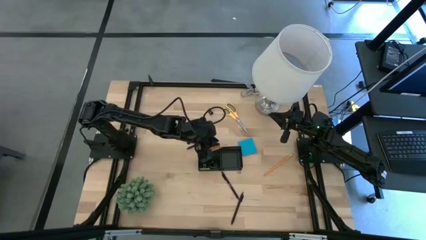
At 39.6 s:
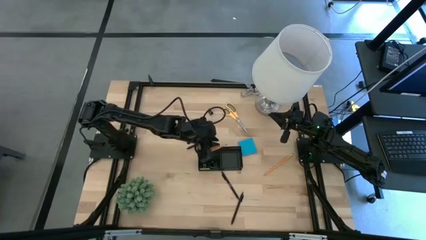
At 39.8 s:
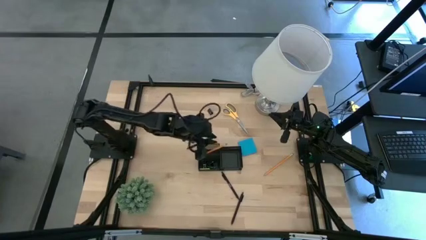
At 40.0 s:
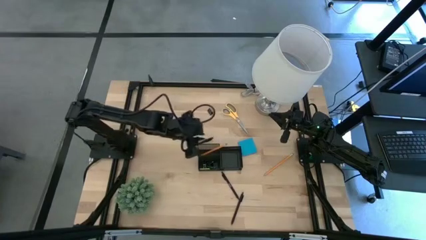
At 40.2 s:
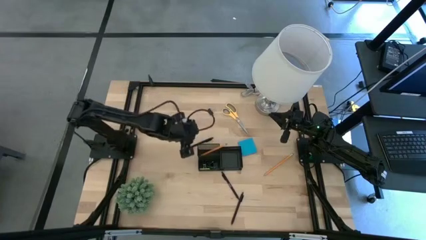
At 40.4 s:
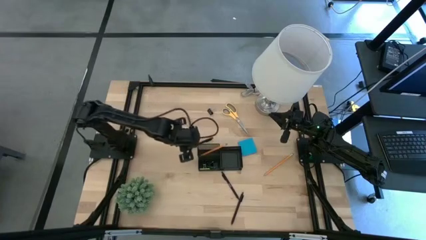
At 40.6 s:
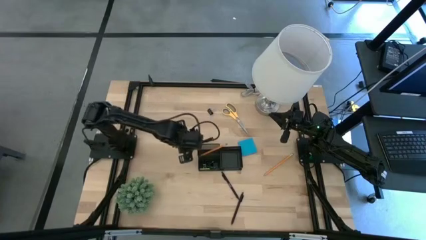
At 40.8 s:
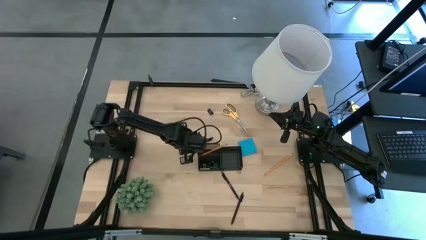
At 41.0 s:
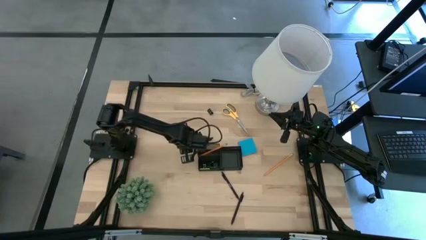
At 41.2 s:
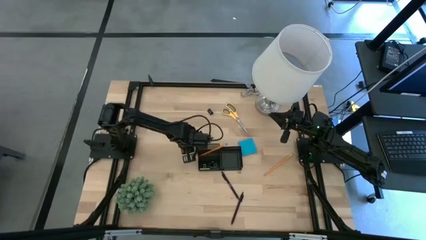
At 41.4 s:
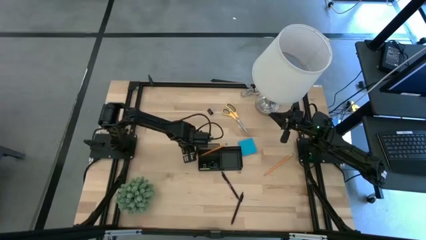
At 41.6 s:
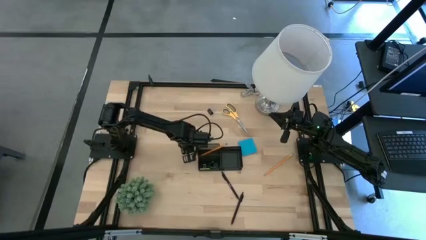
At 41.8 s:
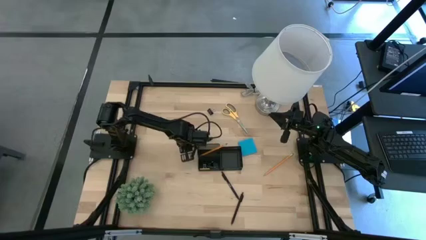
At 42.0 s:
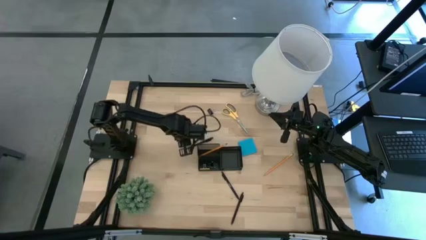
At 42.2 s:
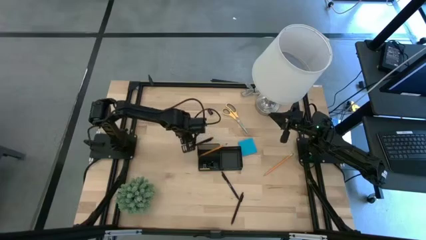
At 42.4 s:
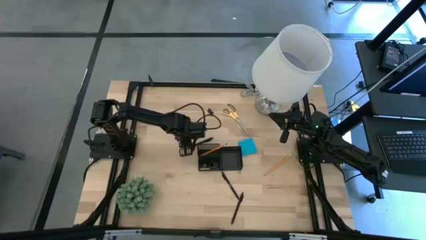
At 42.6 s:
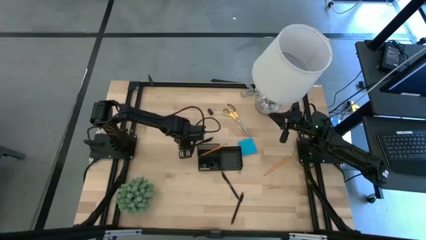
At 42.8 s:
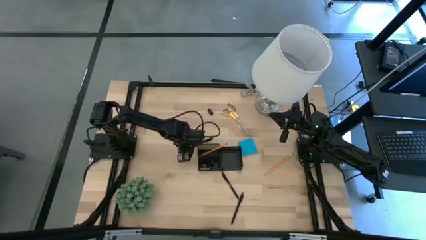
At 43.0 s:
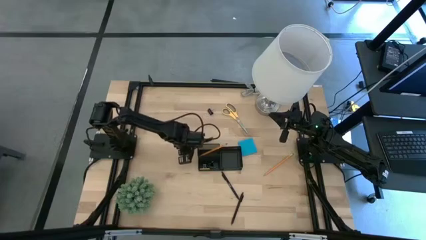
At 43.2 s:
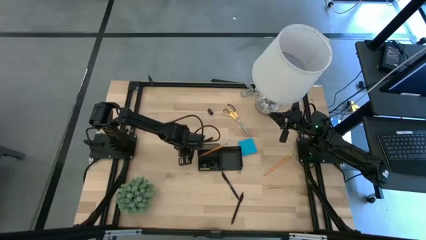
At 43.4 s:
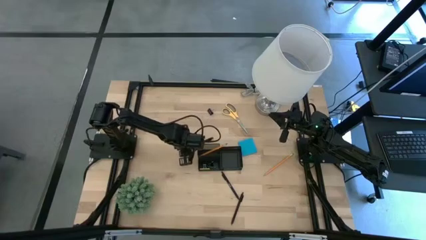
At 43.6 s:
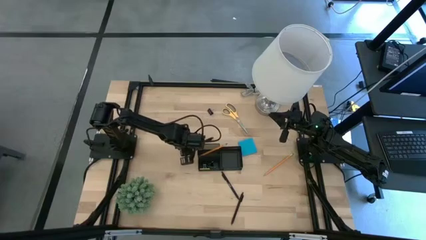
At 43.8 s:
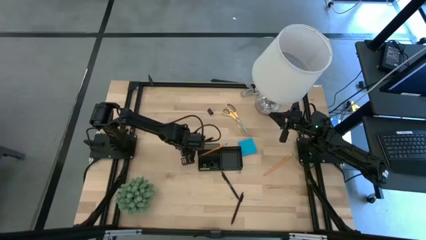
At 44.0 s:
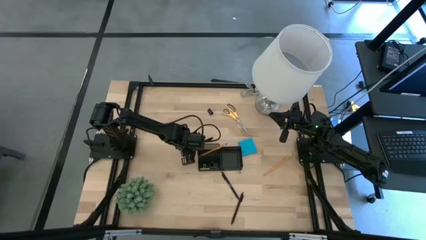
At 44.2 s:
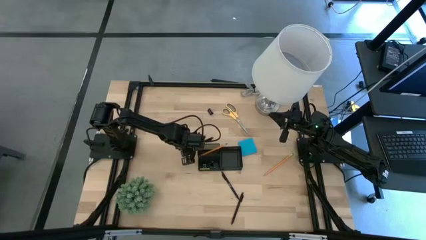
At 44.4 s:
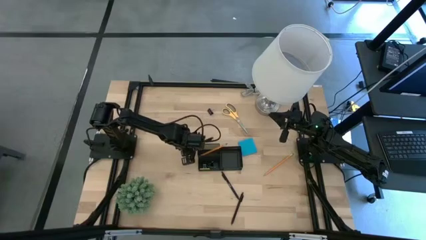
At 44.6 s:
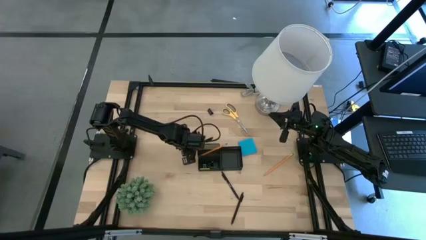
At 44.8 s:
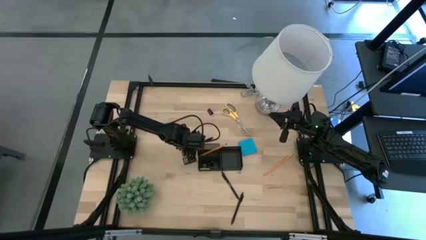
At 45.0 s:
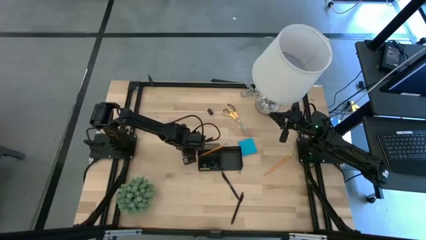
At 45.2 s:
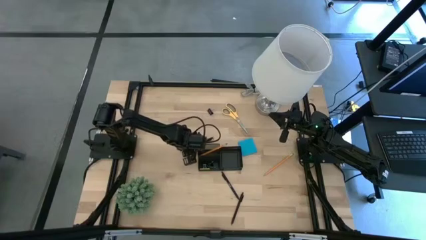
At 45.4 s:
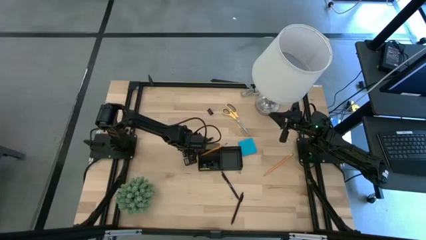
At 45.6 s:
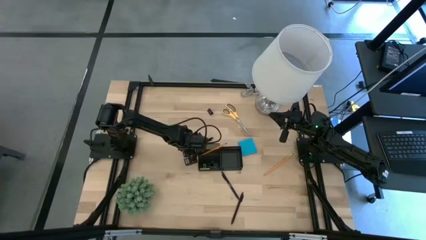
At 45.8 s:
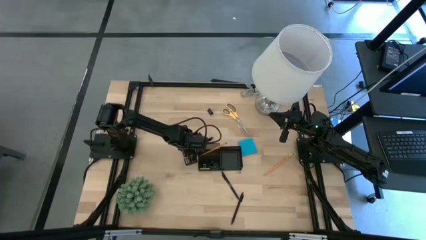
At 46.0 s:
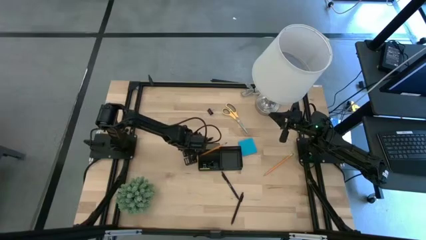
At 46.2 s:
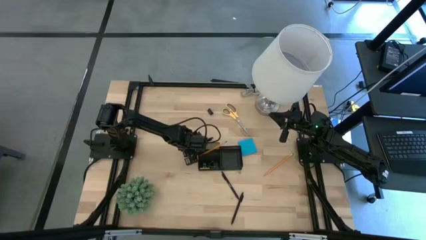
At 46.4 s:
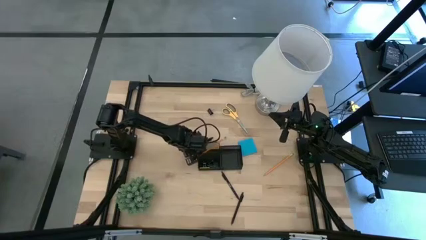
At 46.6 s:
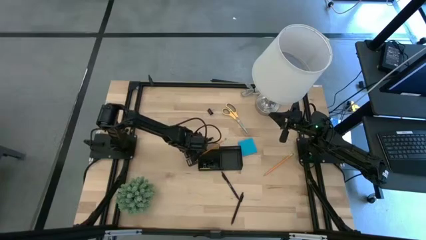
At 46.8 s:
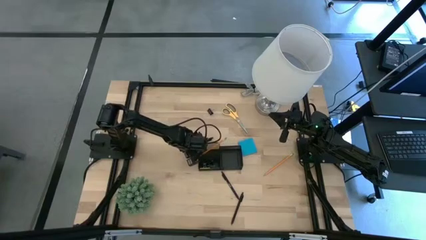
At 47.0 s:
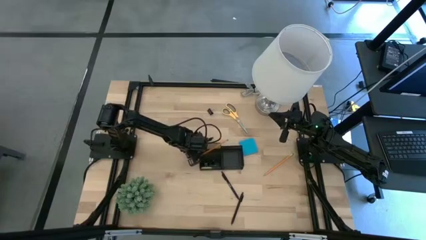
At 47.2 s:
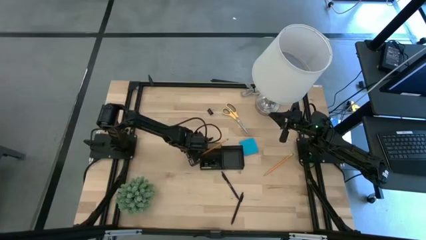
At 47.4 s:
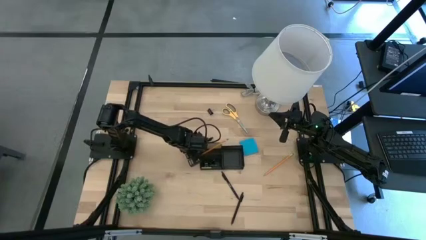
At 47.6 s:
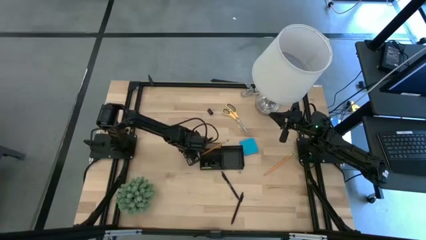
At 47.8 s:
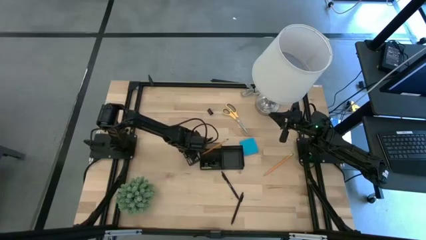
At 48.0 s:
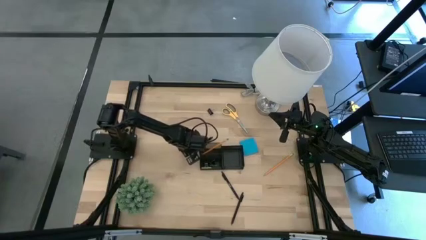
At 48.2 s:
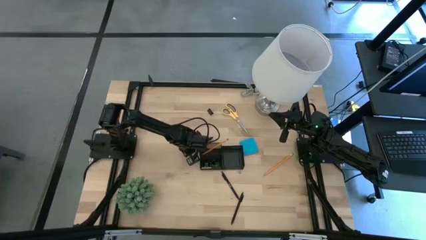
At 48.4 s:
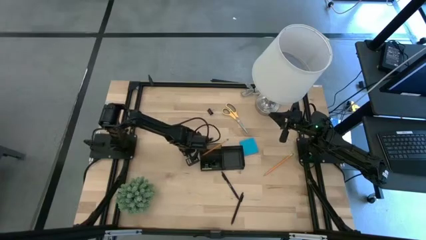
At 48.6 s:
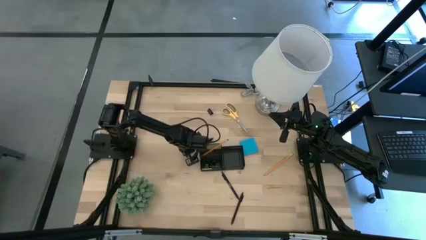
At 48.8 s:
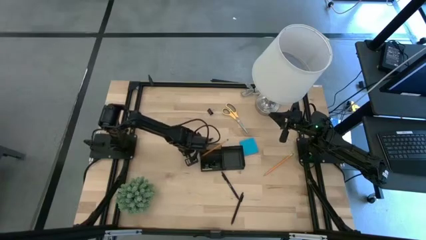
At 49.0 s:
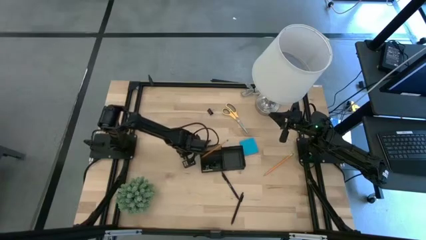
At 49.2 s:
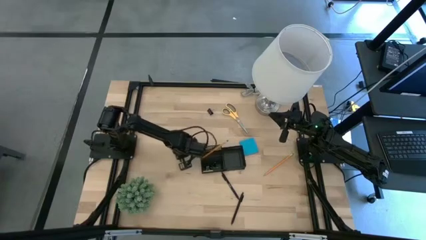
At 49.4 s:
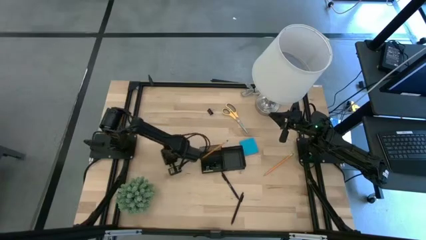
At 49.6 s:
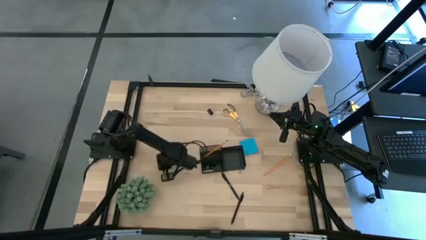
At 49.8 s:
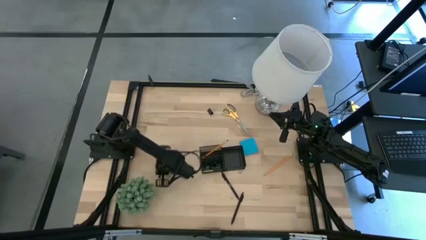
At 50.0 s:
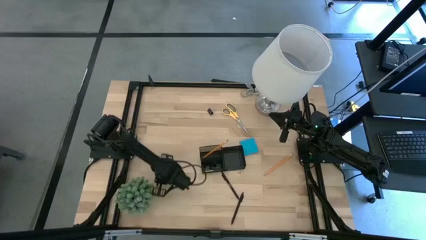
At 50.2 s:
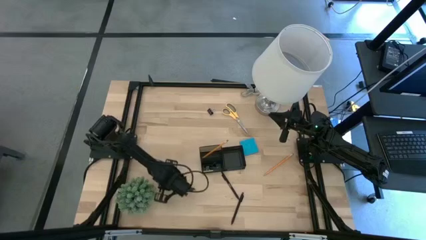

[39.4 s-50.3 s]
Task: Pick and place office supplies into organizer
Put the top black pen into the desk organizer

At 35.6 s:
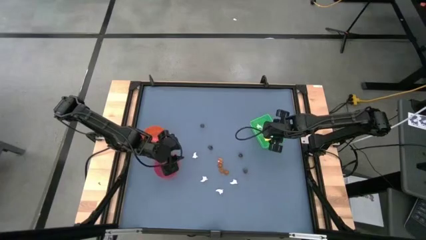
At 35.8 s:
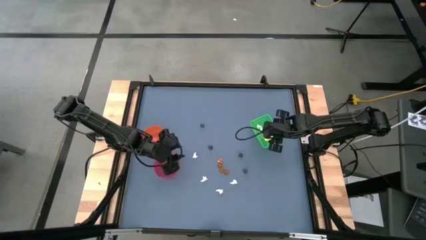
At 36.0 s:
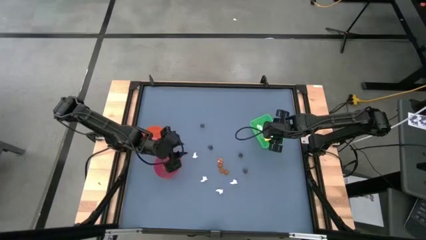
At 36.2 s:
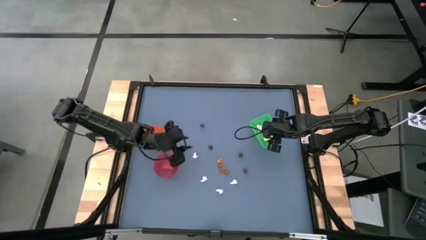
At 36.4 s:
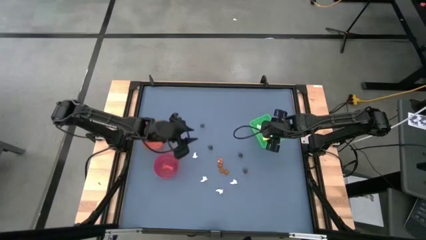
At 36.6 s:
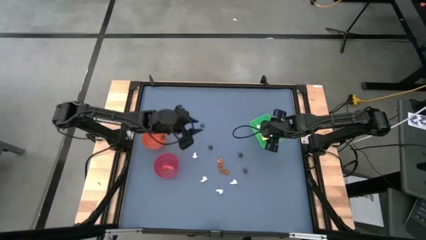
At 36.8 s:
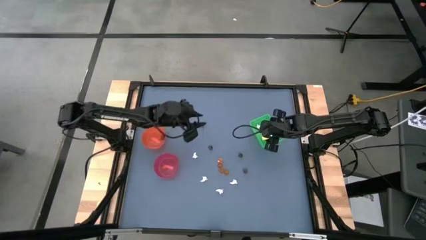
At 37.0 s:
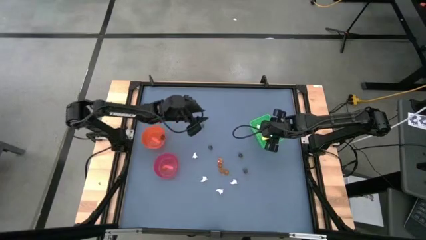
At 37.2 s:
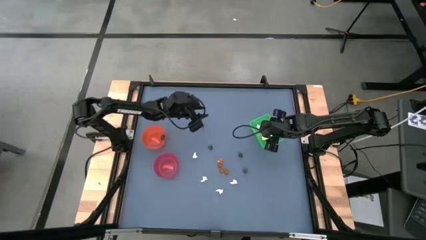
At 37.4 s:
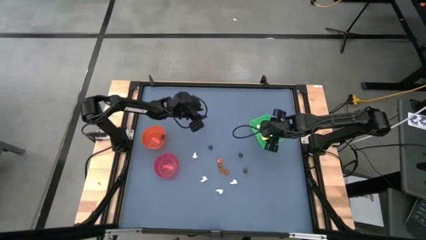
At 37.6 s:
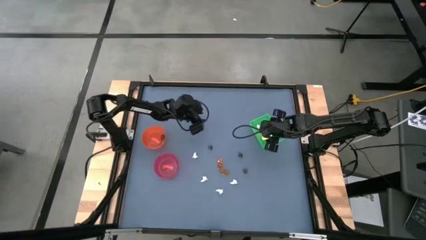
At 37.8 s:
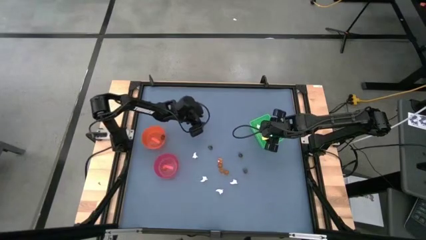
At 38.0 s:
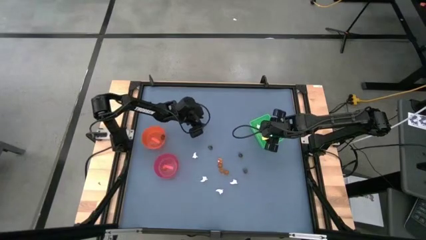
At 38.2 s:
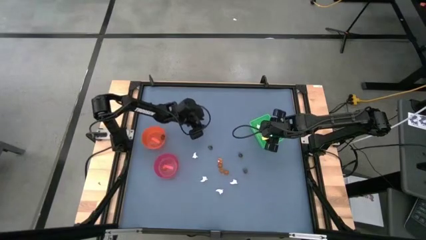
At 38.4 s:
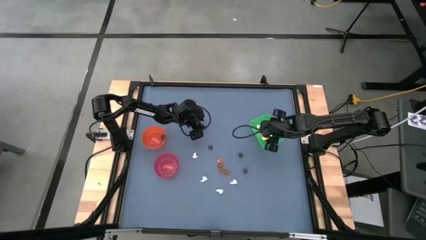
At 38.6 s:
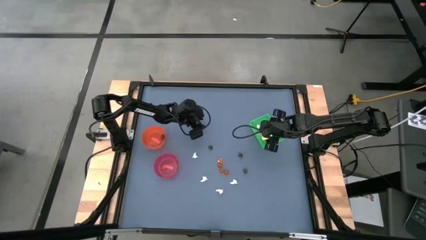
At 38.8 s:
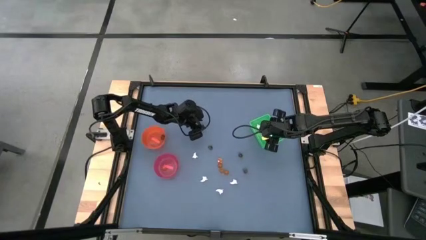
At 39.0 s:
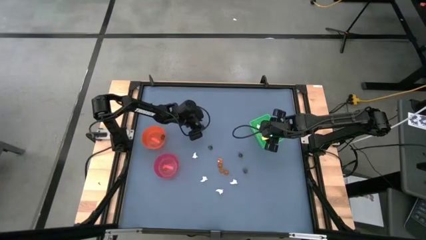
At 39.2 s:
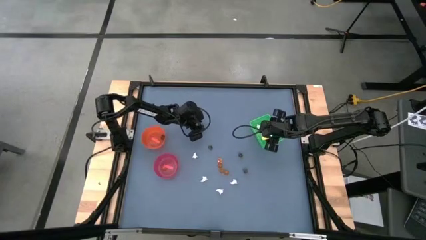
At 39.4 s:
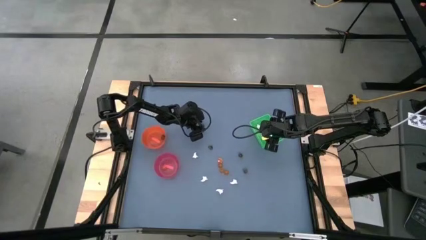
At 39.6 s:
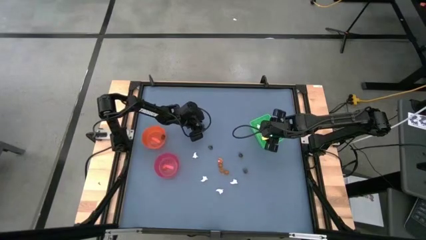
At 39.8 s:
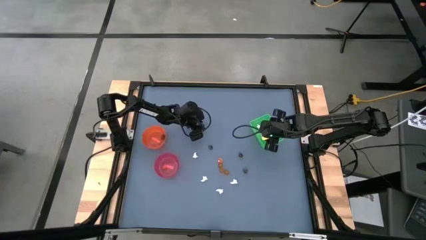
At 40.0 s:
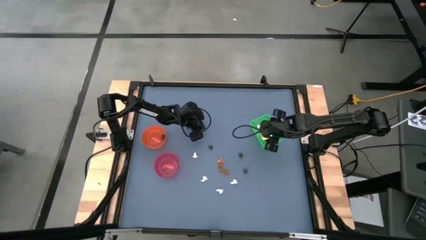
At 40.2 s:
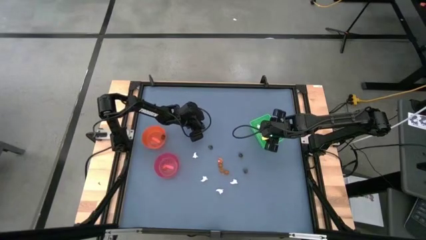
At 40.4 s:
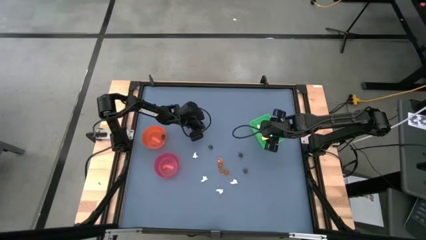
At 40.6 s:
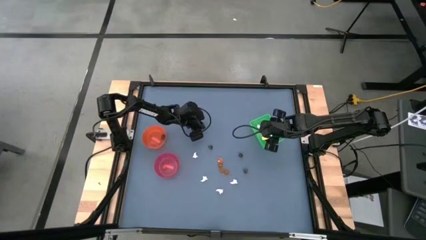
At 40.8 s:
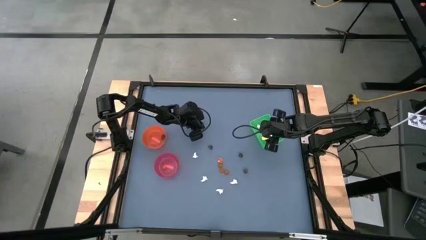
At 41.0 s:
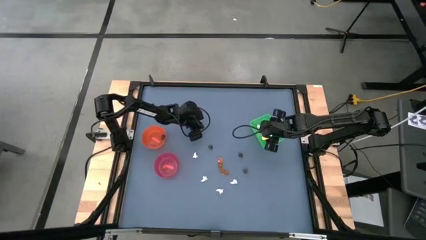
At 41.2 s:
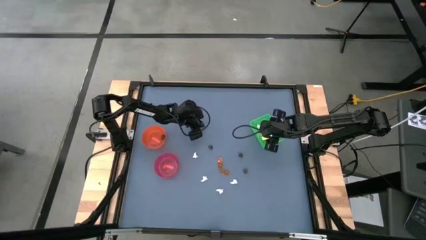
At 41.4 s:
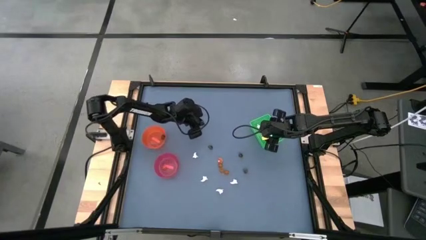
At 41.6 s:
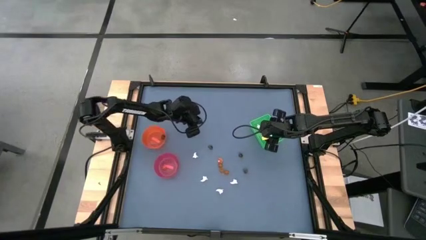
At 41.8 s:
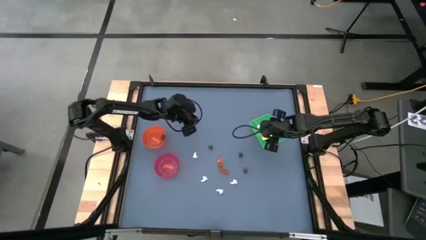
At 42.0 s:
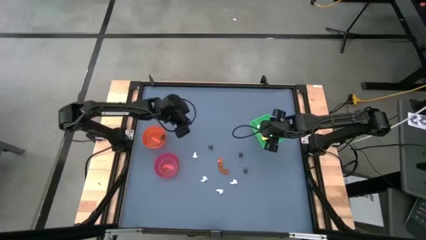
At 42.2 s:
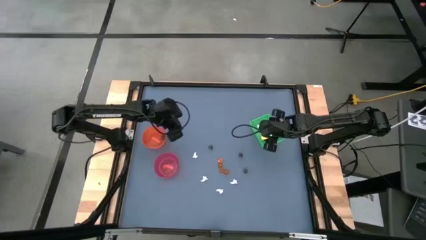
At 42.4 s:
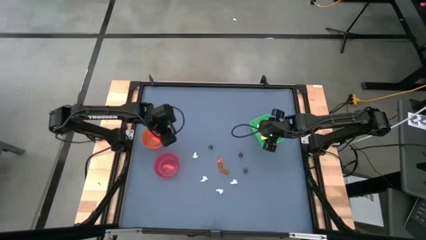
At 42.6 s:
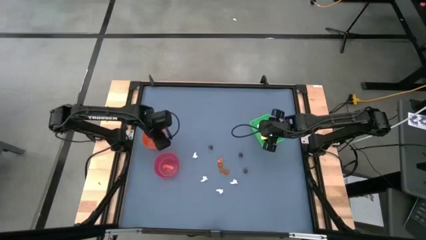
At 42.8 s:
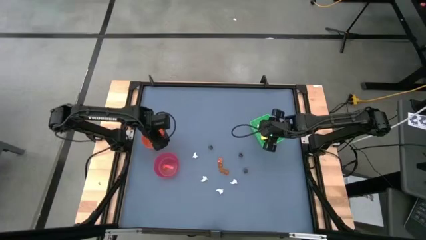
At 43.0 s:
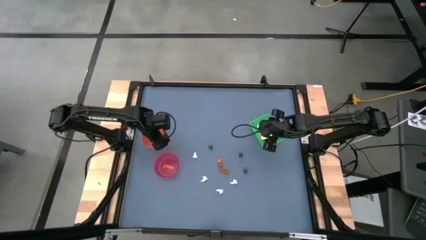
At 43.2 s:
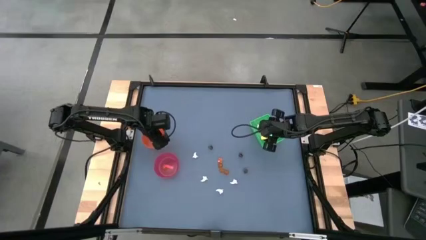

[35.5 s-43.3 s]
Task: Sort Halloween decoration
Put the black skull toy into the orange bowl
